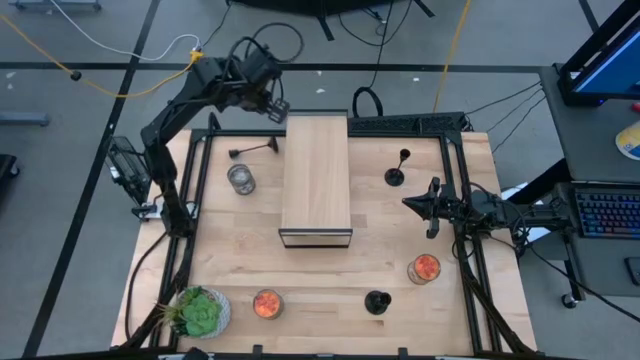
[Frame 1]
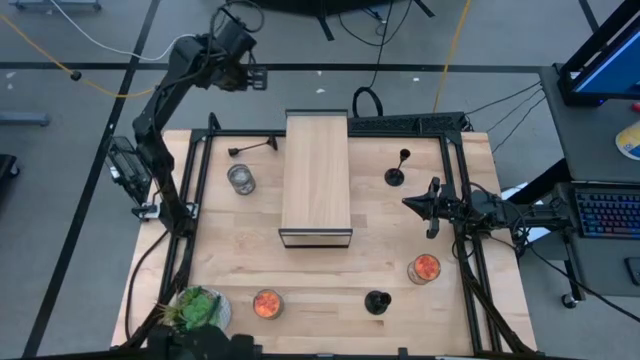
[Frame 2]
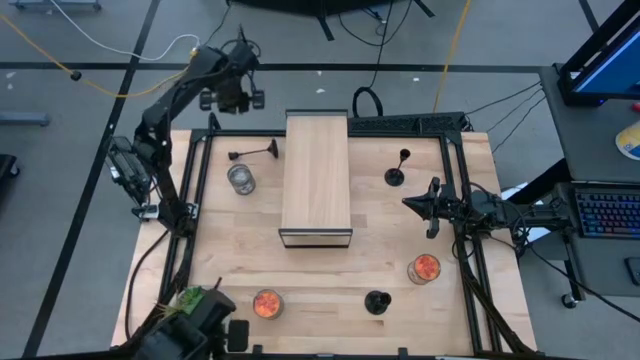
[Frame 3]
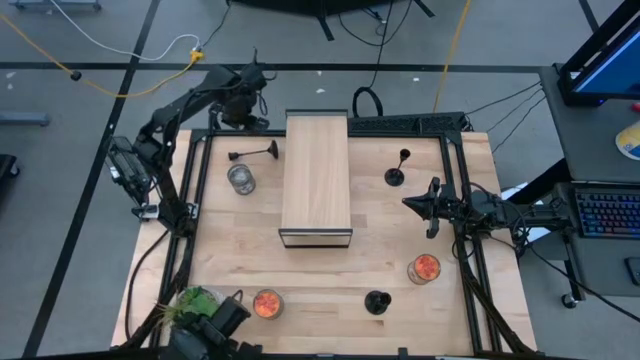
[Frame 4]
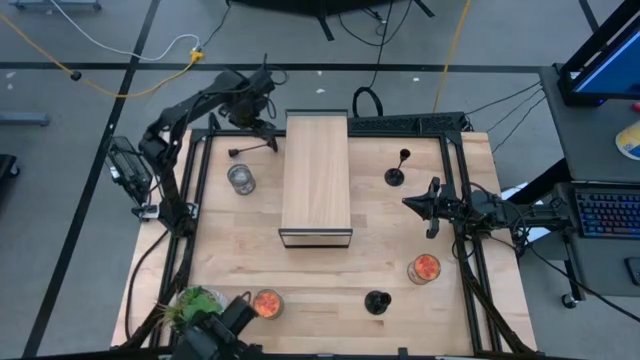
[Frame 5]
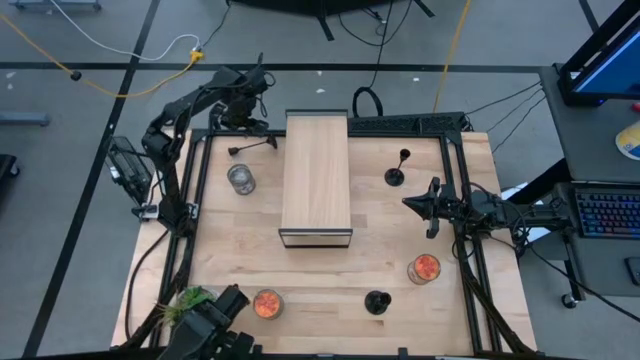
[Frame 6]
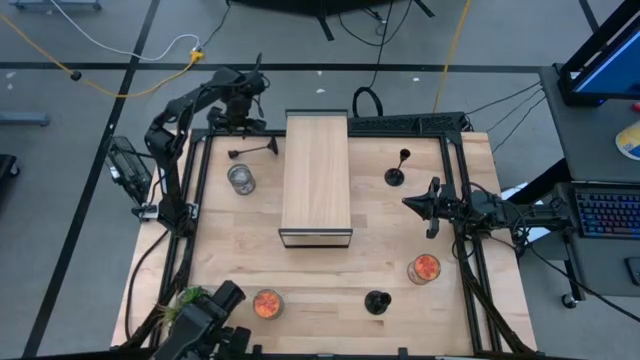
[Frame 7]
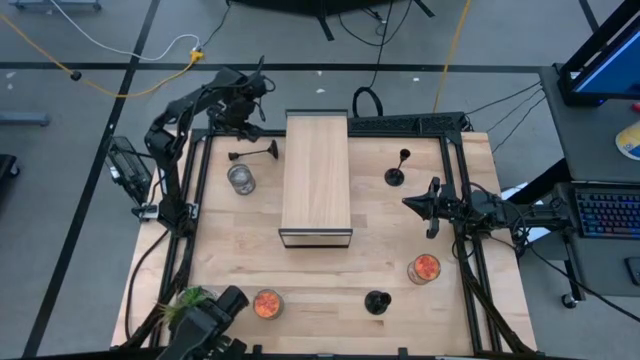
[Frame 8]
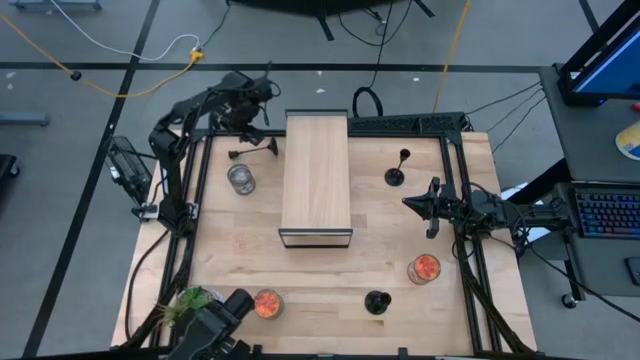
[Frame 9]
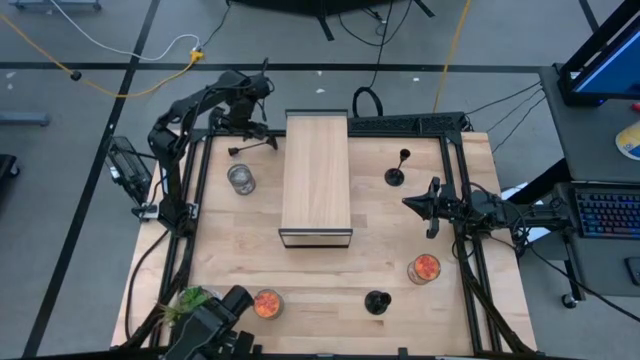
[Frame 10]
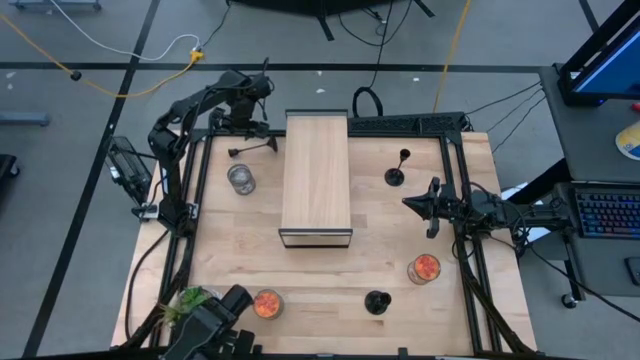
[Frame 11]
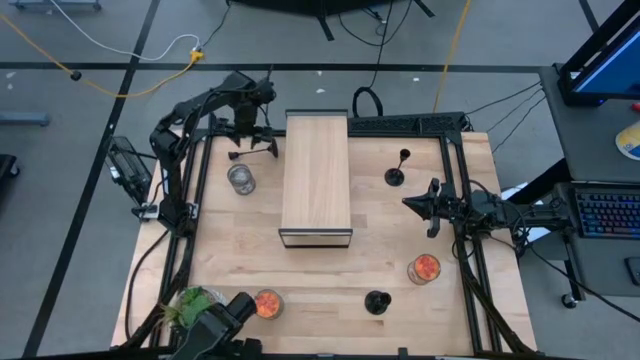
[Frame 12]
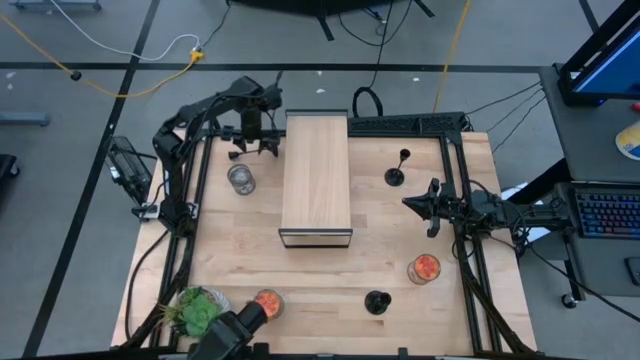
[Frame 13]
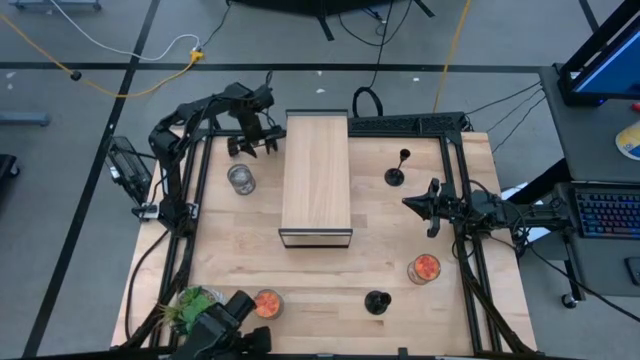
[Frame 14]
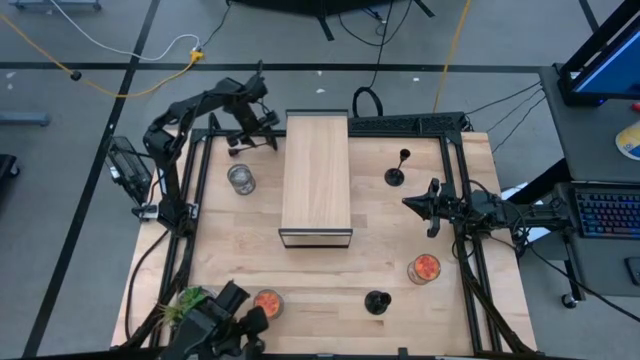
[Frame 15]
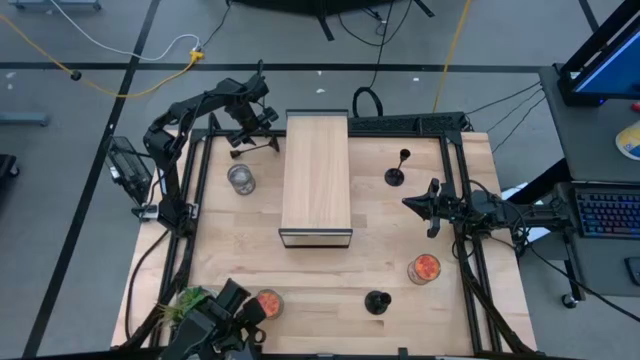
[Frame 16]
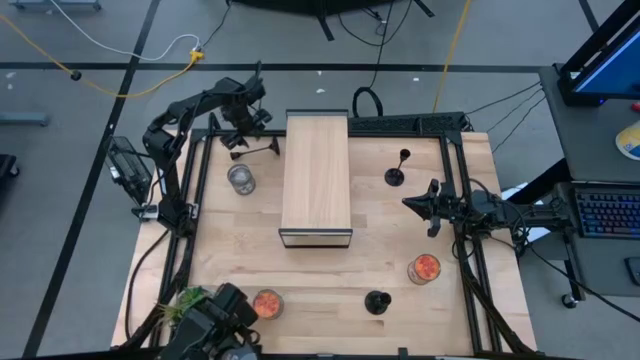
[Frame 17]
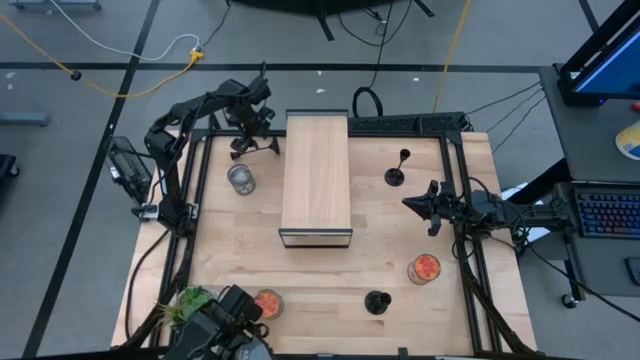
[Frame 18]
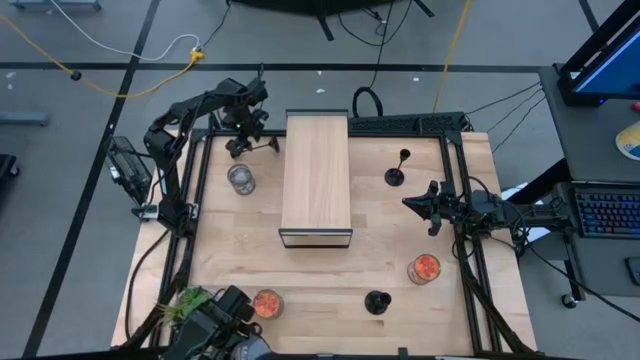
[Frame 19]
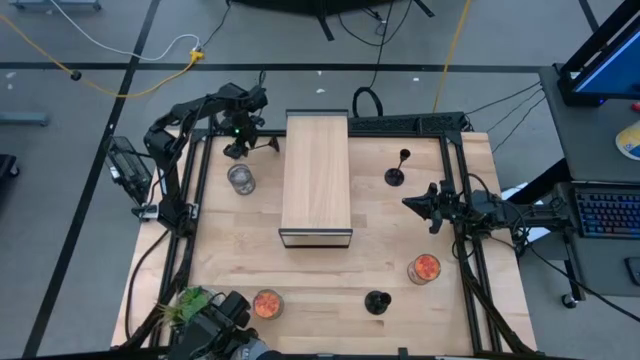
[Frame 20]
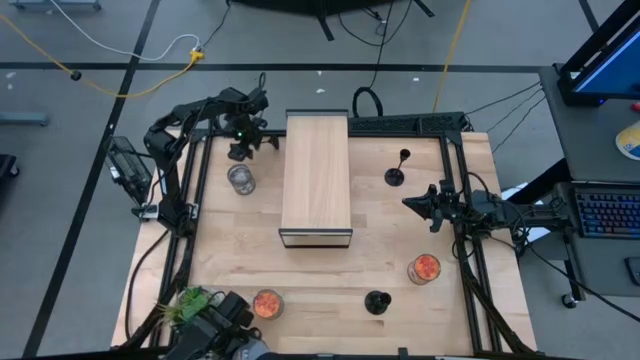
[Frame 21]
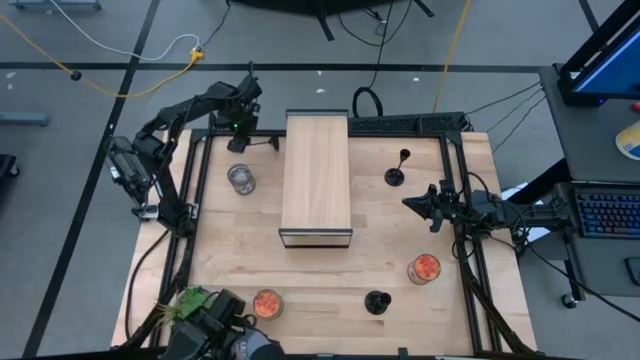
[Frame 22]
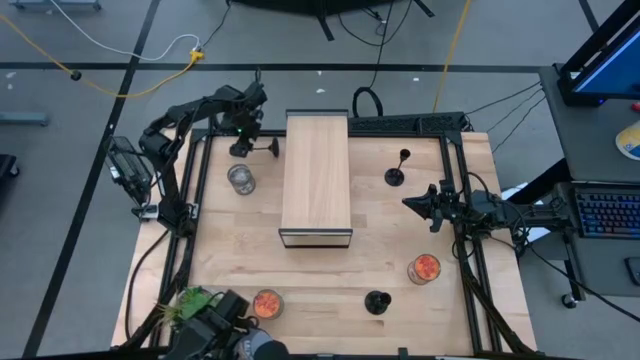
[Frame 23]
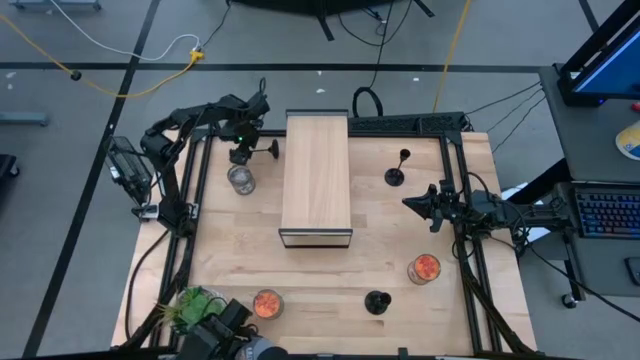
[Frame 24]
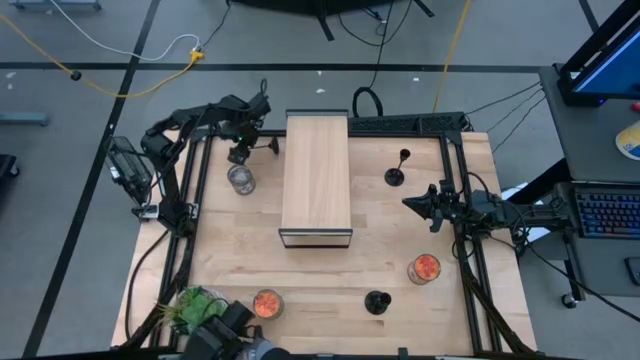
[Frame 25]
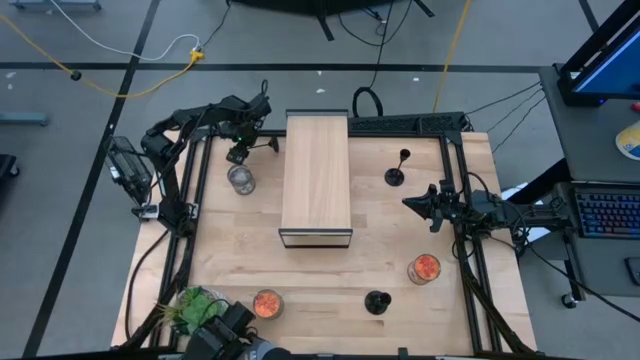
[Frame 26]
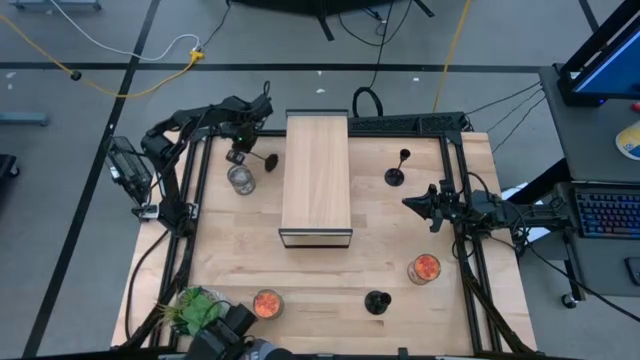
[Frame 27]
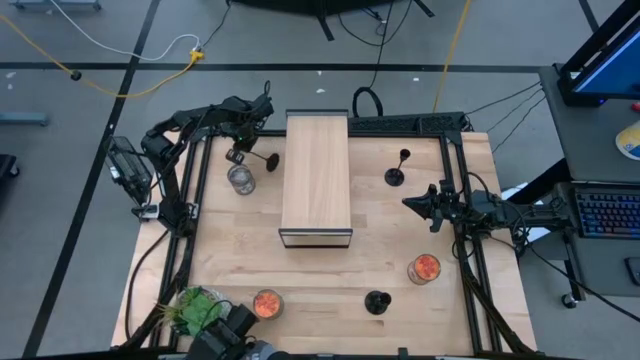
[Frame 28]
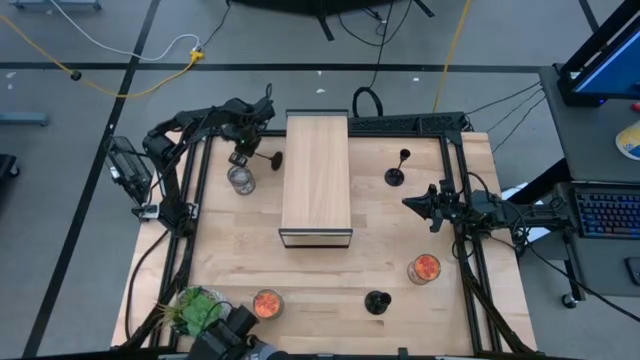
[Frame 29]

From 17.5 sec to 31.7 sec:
Task: Pick & Place candle stick holders
Put the top left black candle holder on the shelf

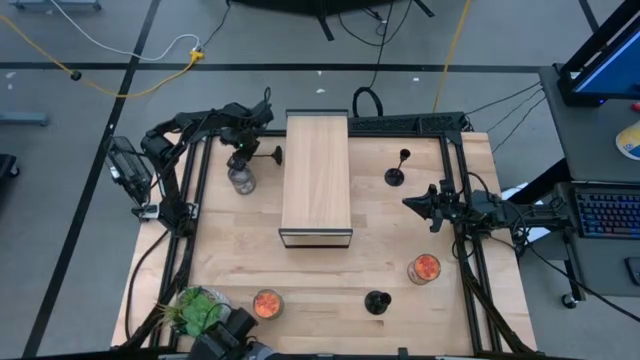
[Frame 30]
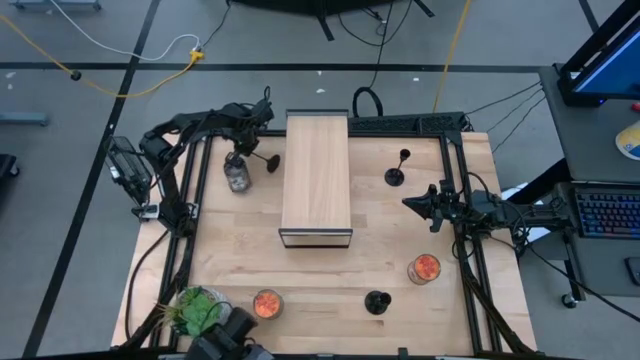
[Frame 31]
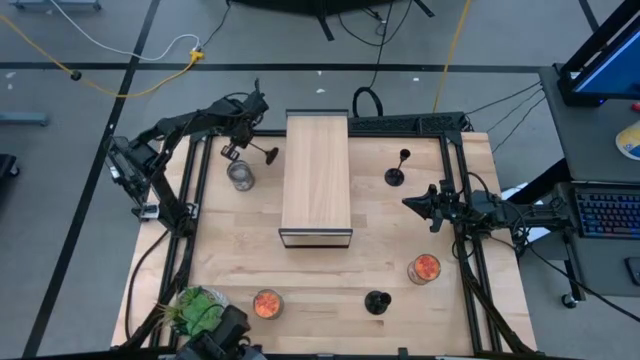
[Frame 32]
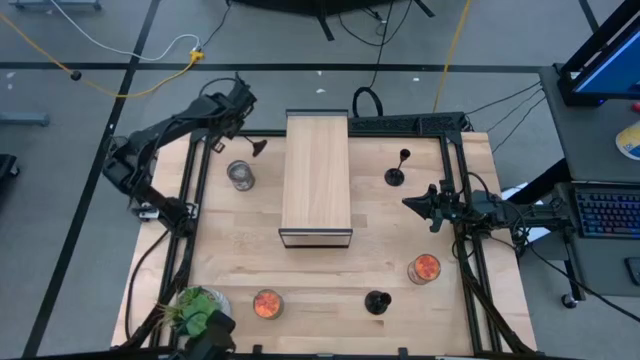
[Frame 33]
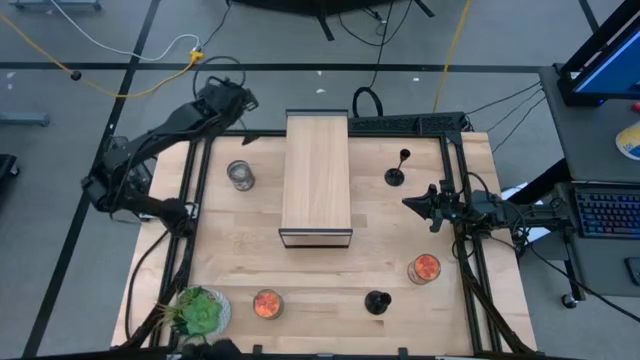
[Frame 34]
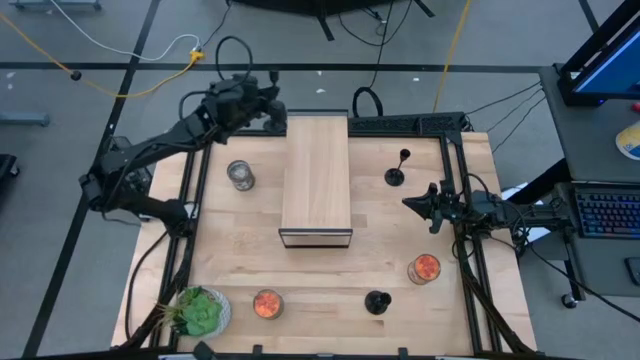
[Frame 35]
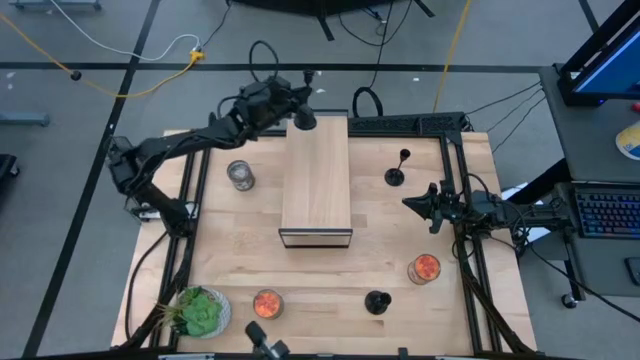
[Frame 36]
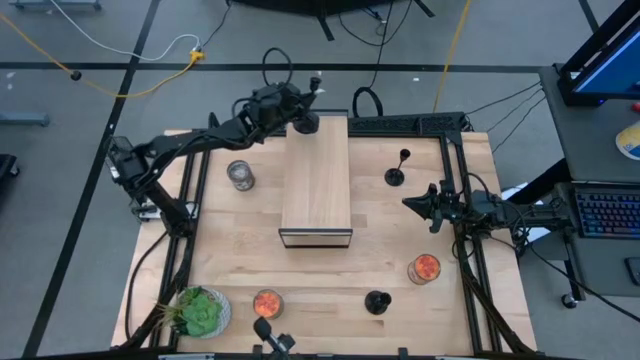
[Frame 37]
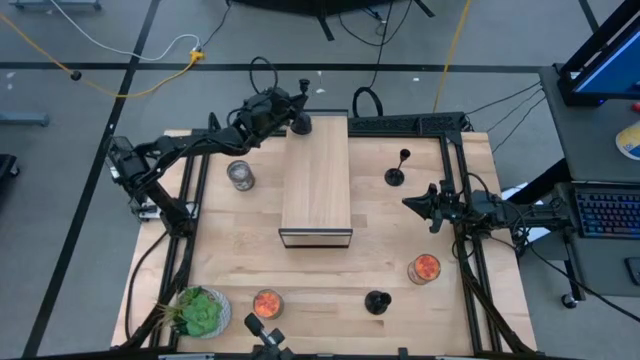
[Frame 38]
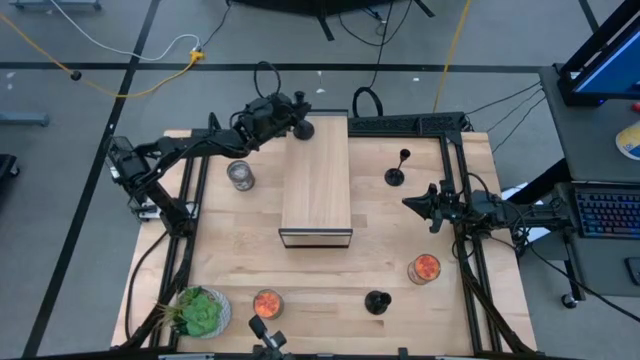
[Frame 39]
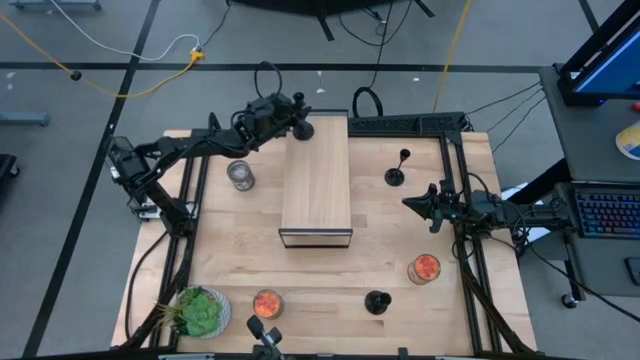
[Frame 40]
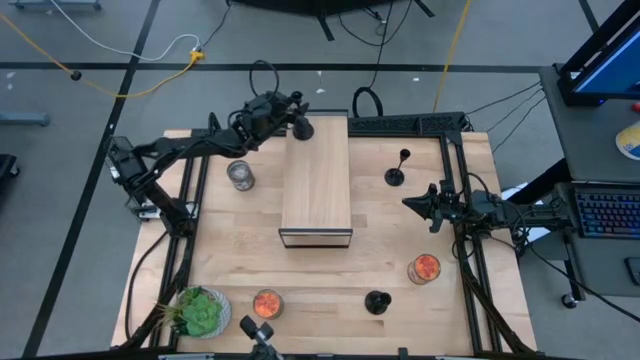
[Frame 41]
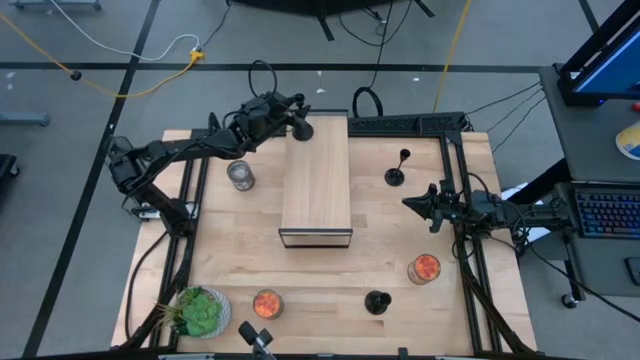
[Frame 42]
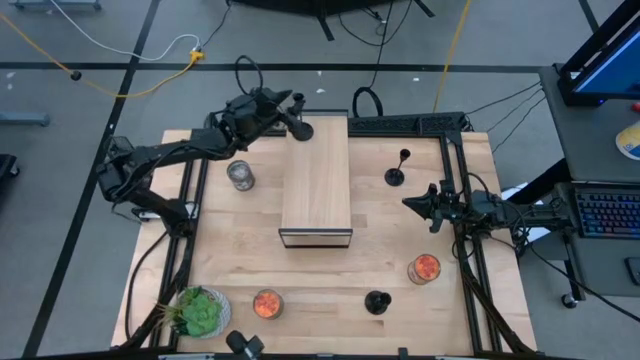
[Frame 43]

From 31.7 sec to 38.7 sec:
Put the top left black candle holder on the shelf
